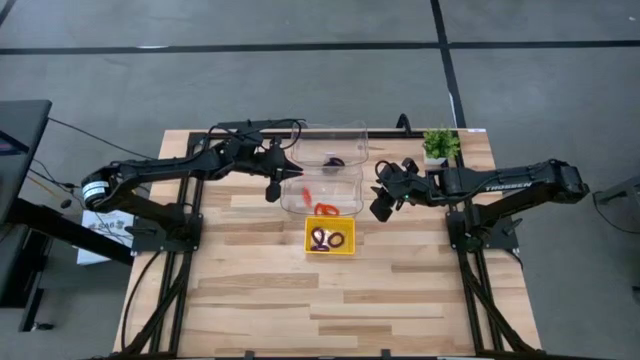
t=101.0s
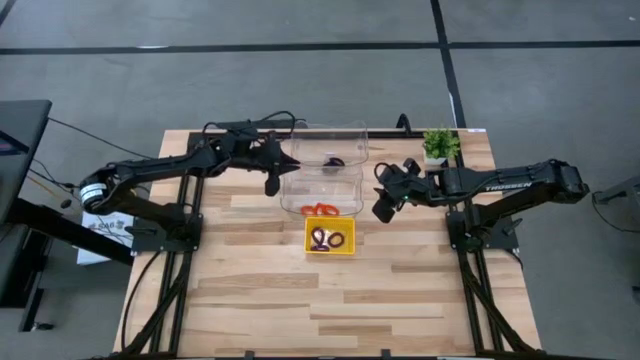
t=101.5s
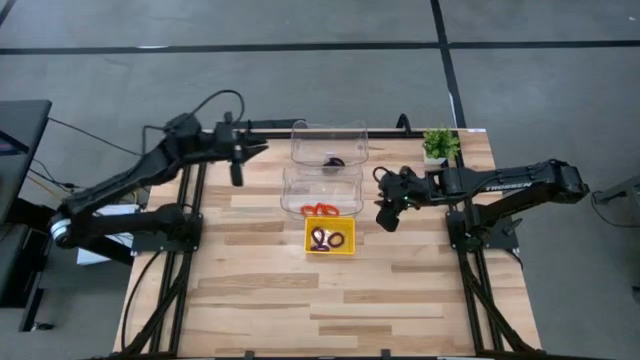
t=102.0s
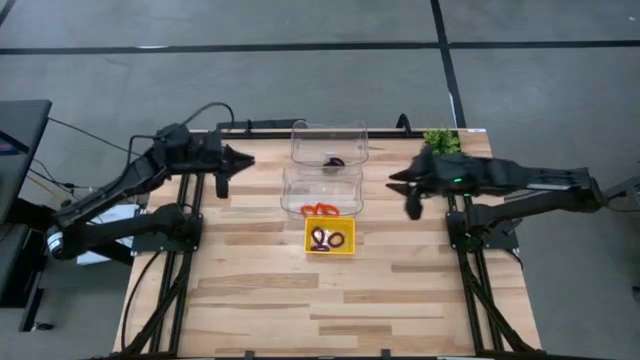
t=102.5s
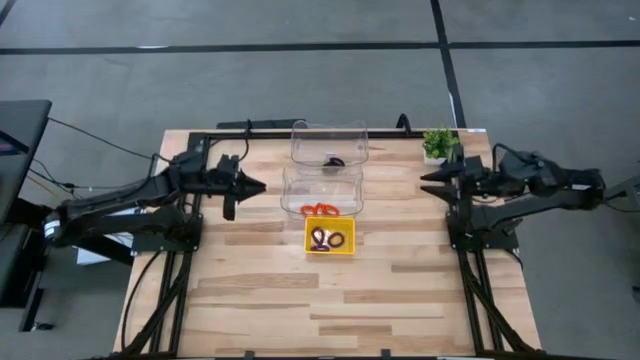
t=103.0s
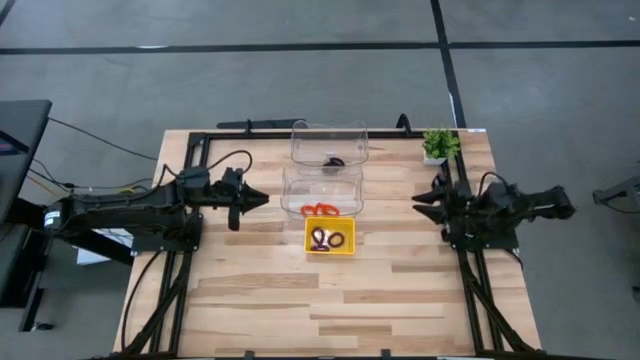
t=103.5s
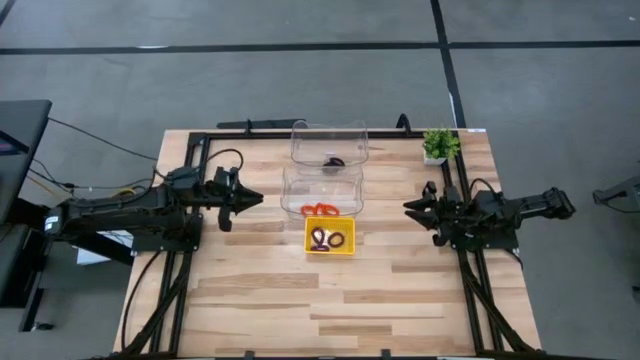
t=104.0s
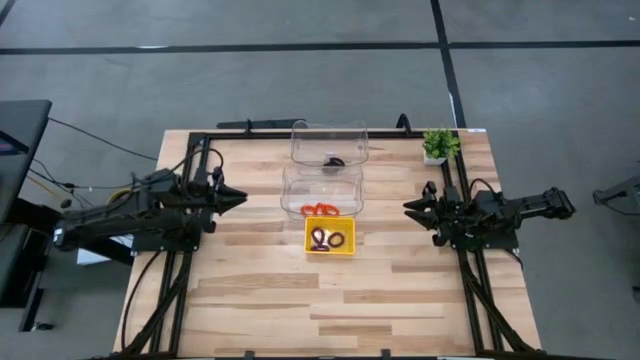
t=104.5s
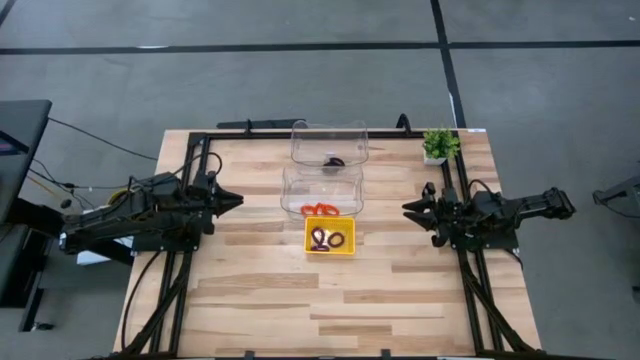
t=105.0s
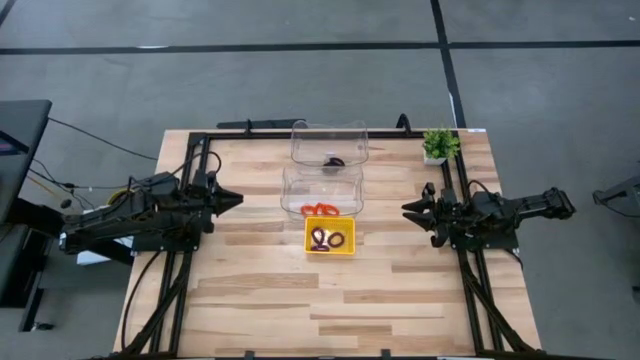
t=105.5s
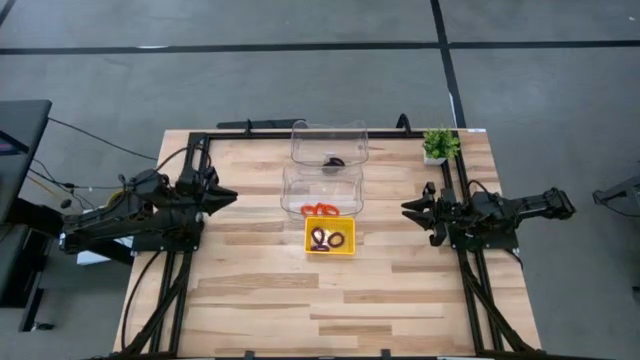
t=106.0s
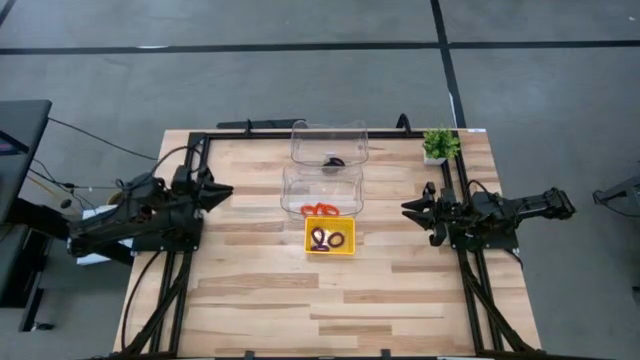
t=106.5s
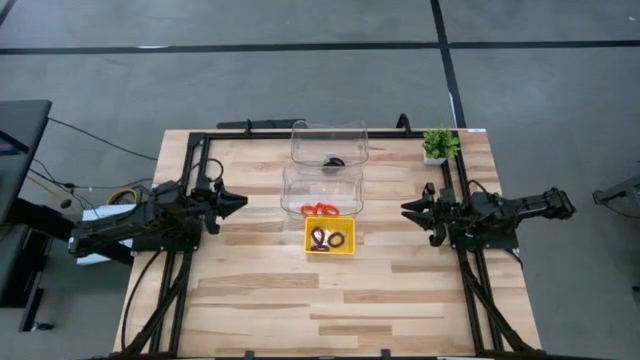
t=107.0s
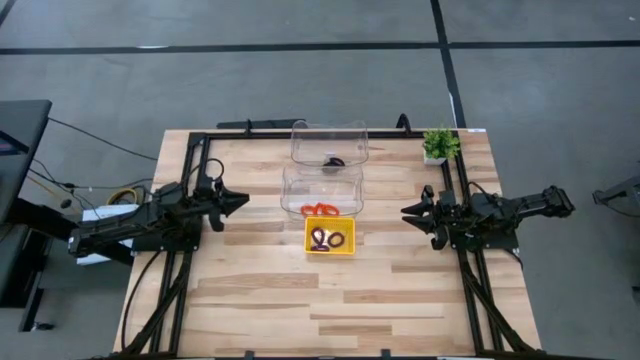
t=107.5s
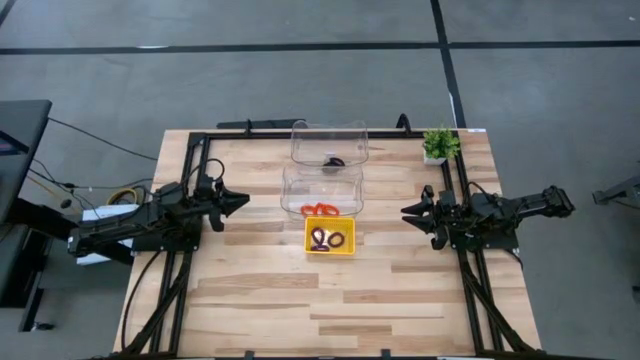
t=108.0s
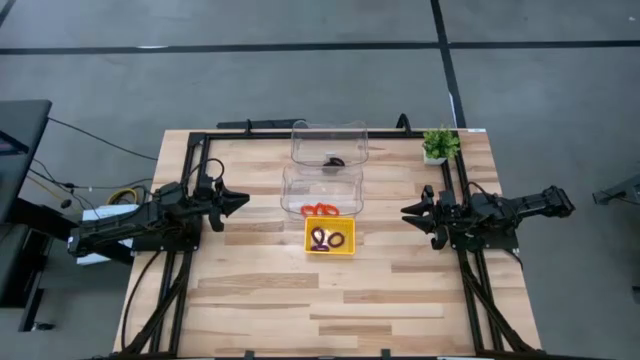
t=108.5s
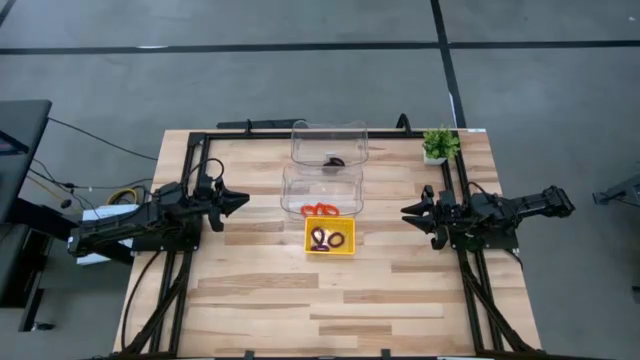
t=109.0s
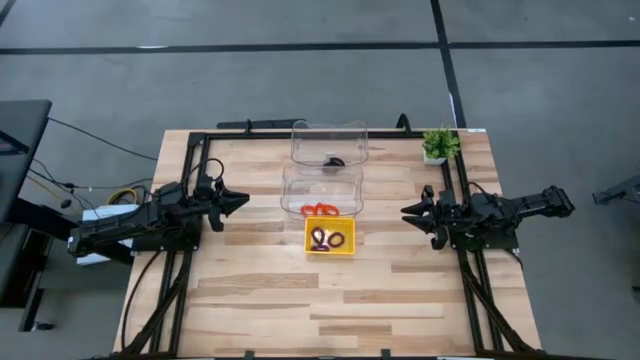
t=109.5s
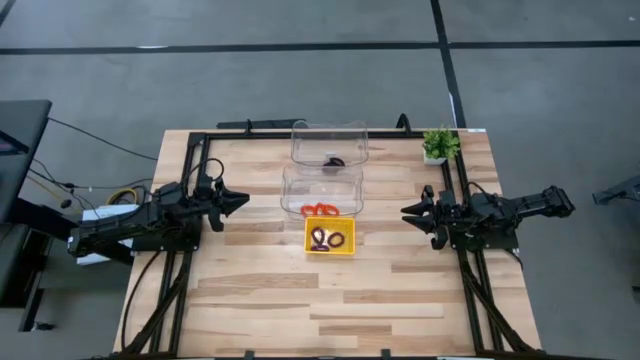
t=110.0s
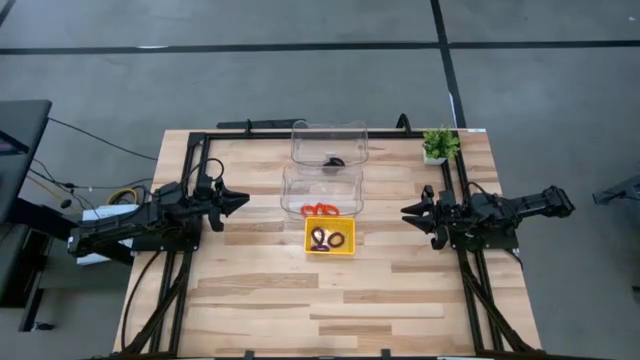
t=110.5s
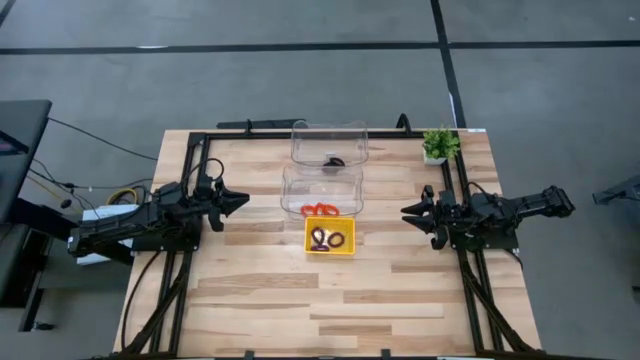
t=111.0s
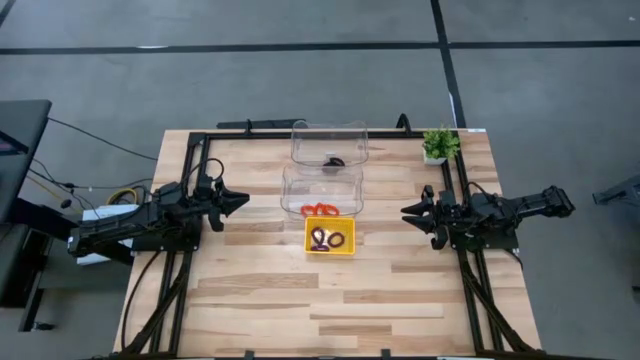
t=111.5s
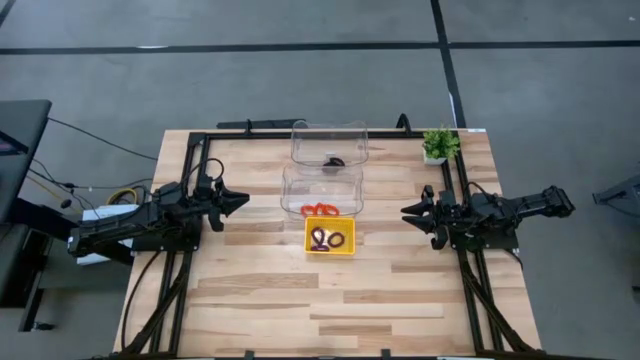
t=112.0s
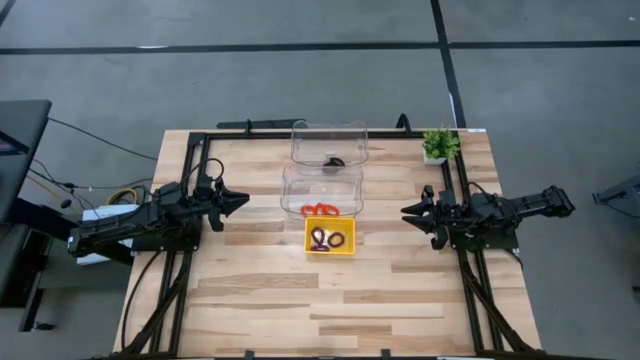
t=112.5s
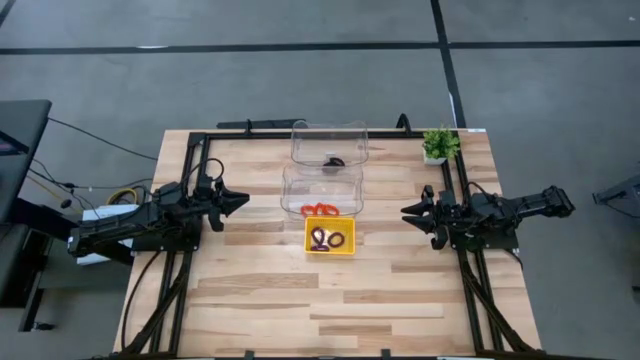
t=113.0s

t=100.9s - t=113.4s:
Task: Sort spring keychains
Return to Home Position

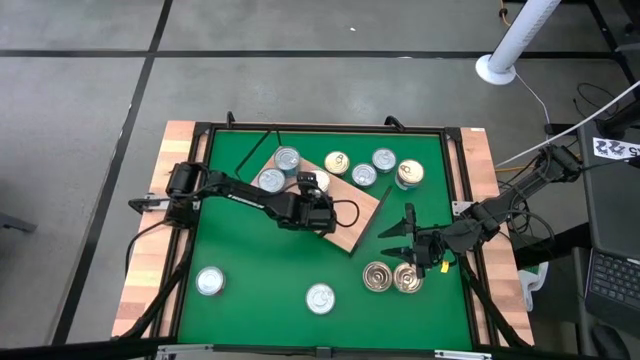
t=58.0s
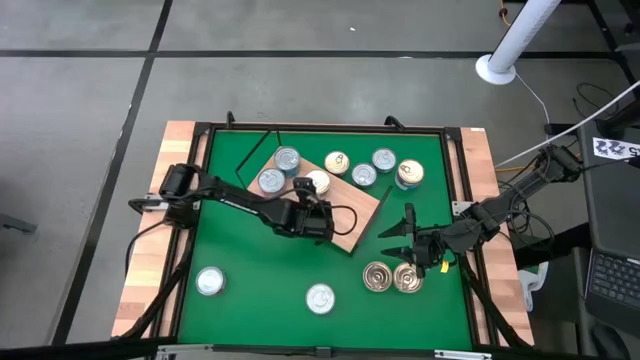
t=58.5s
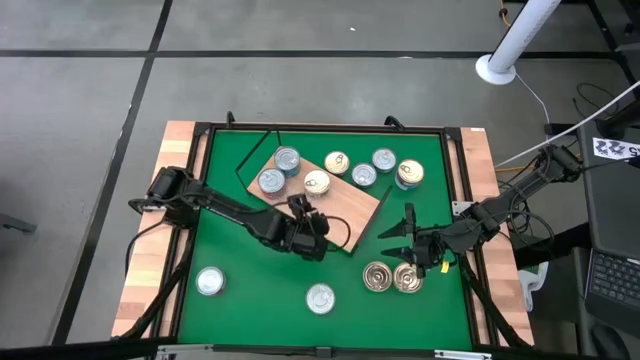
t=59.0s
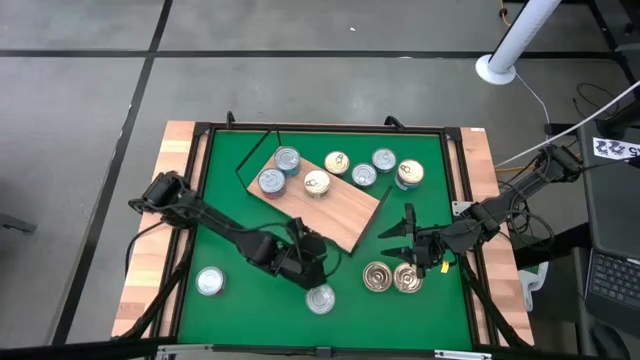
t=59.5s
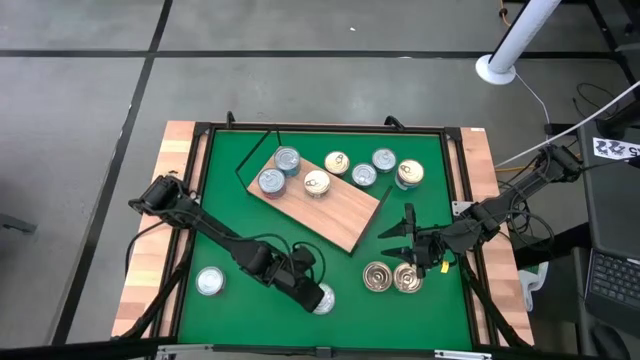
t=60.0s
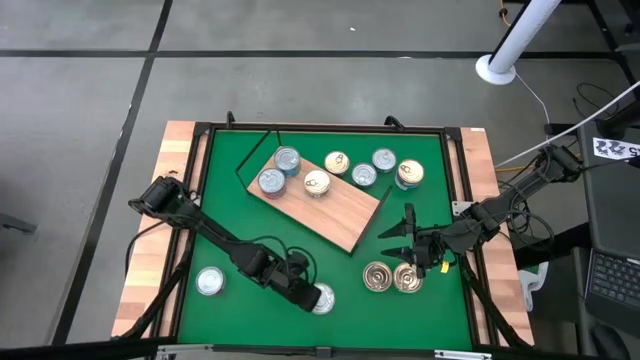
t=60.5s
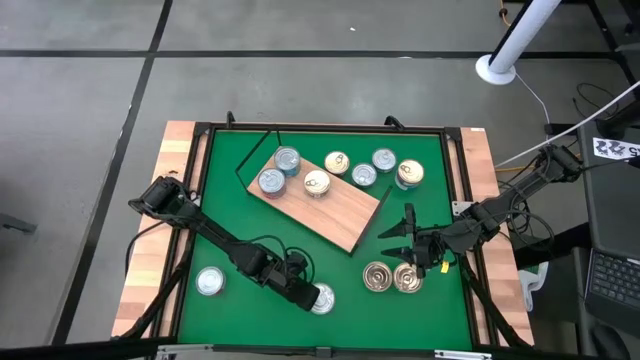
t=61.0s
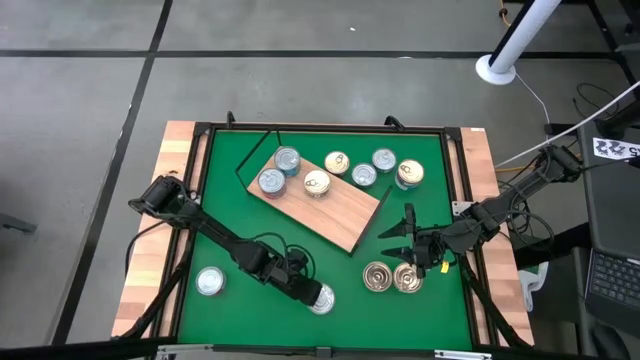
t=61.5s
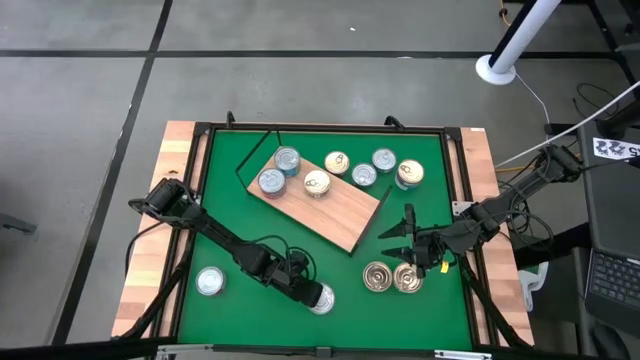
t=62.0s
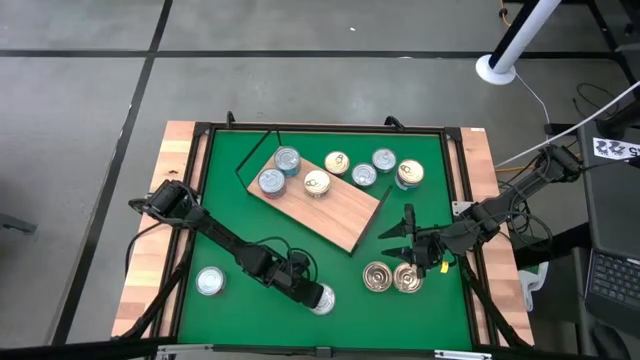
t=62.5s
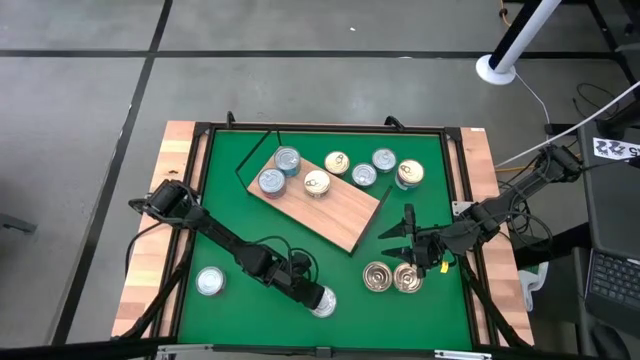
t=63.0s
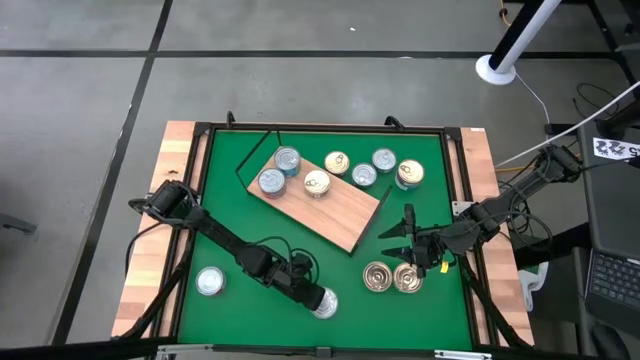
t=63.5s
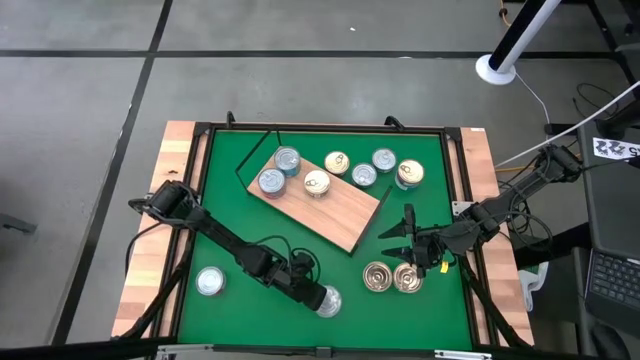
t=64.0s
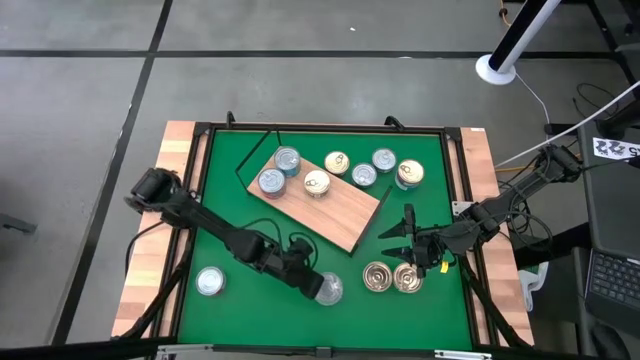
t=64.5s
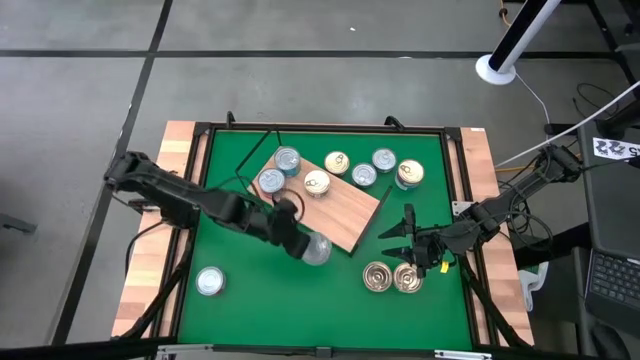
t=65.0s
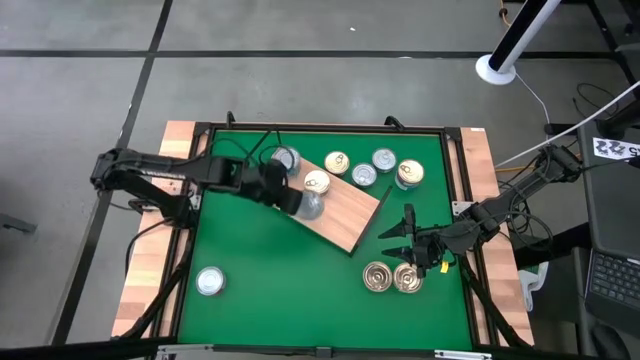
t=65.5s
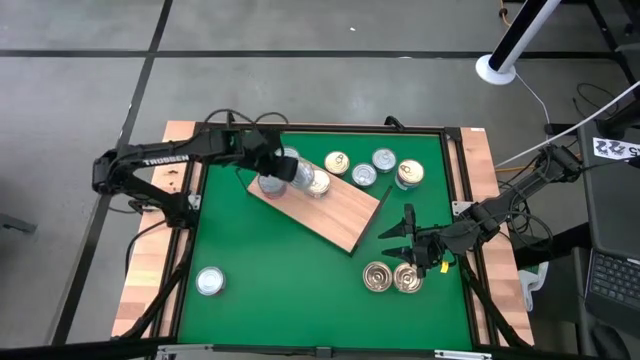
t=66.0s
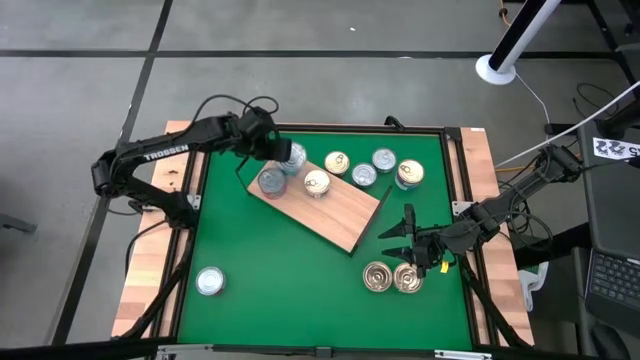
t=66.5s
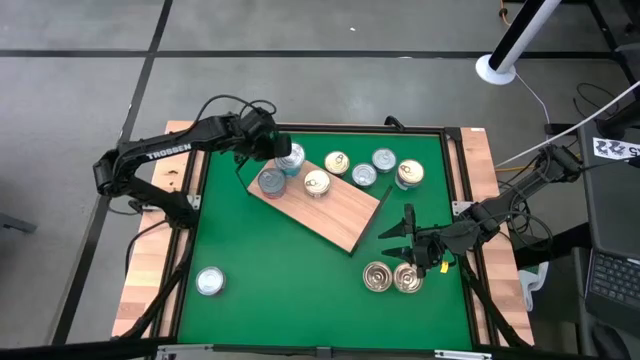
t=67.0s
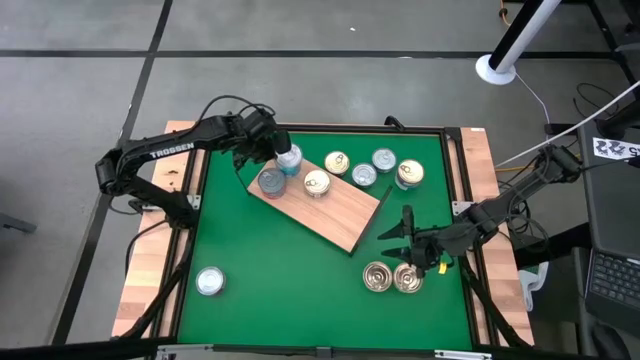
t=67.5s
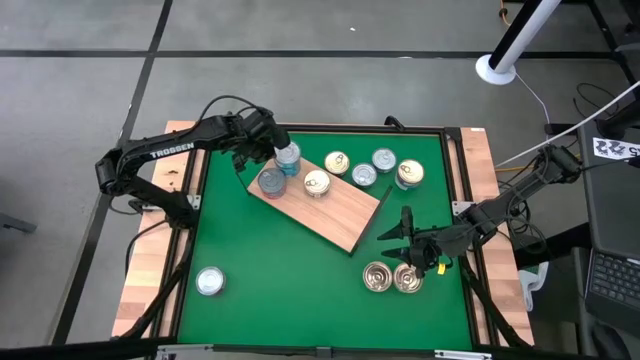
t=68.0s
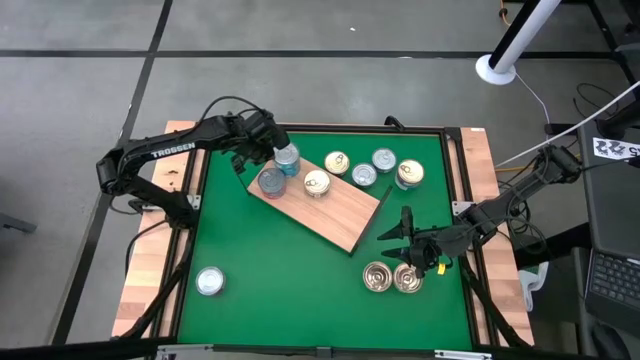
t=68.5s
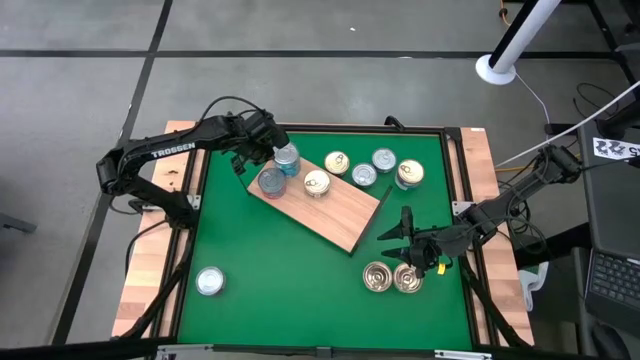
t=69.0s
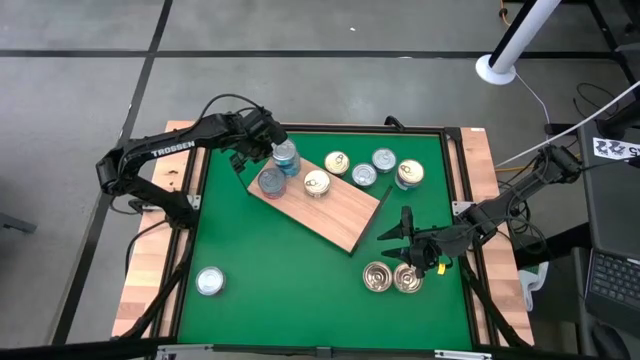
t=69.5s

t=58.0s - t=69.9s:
Task: Stack canned seafood by type on shelf
Stack the yellow and blue tuna can on top of the yellow and blue tuna can on the shelf
